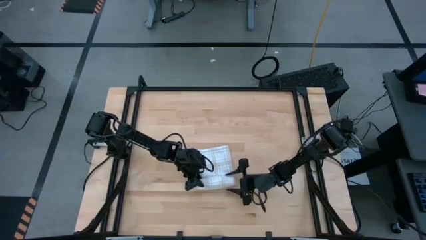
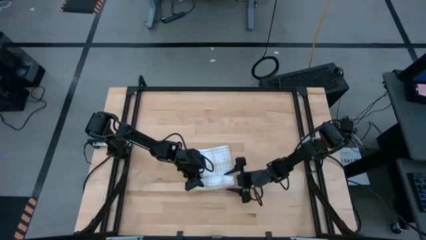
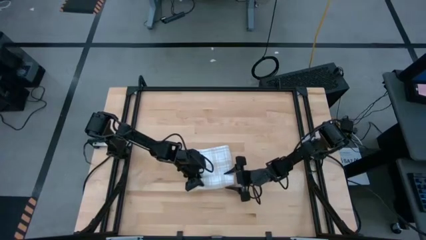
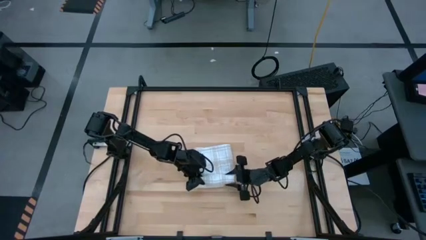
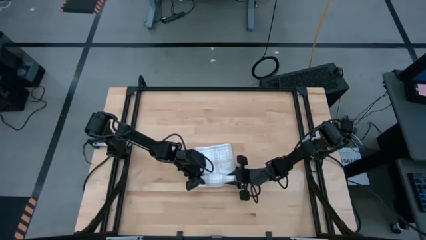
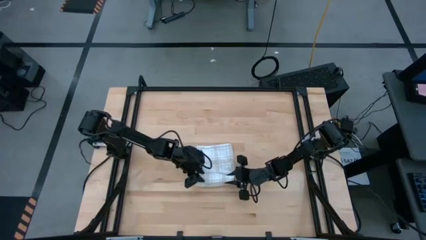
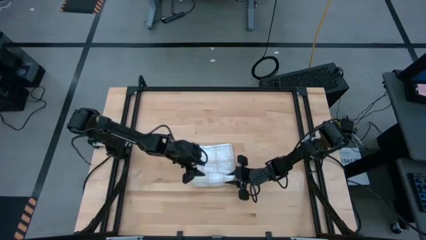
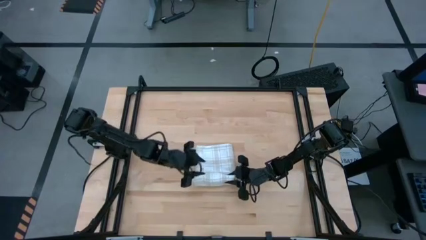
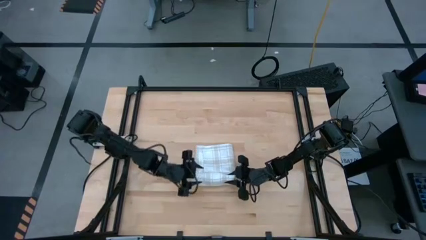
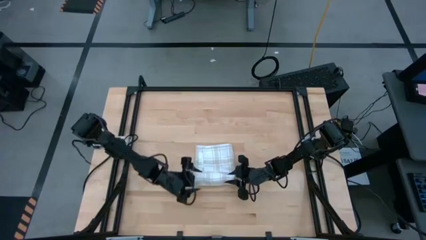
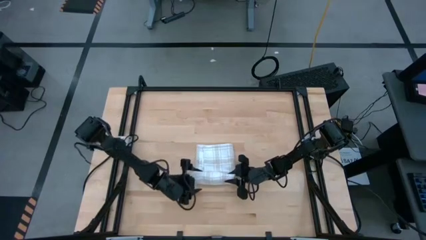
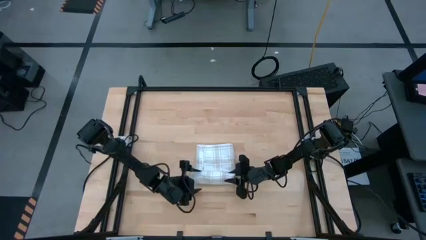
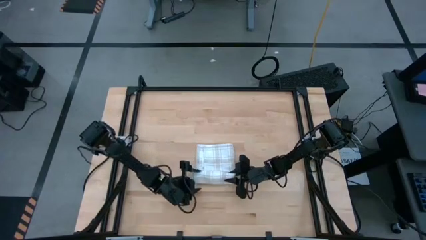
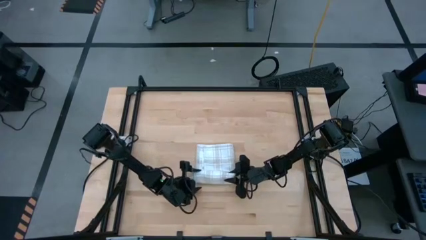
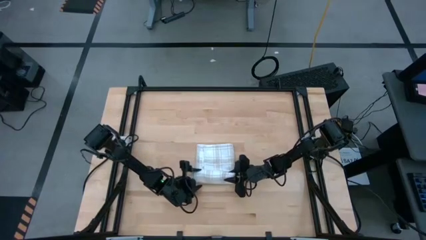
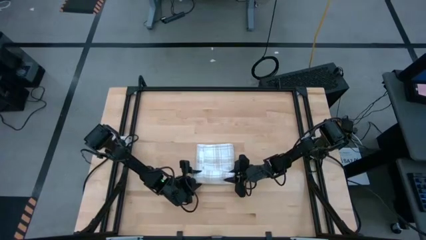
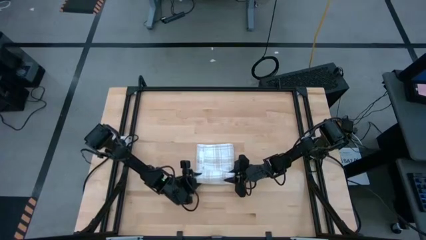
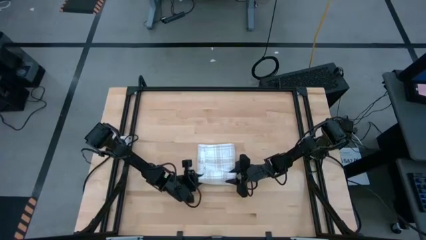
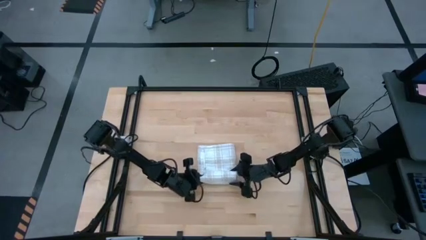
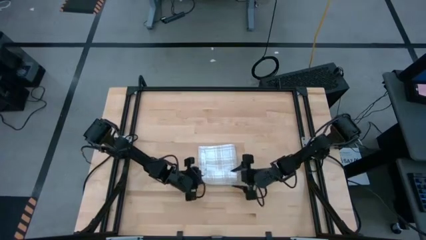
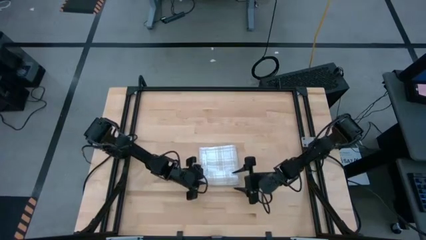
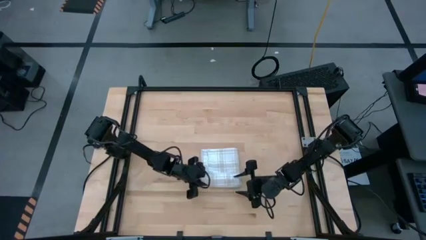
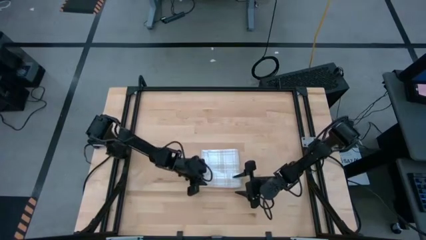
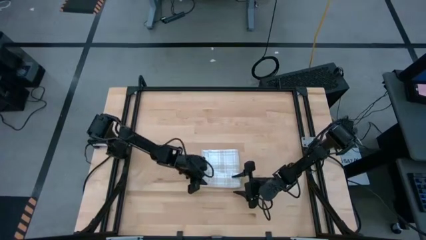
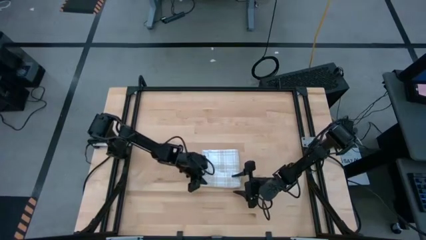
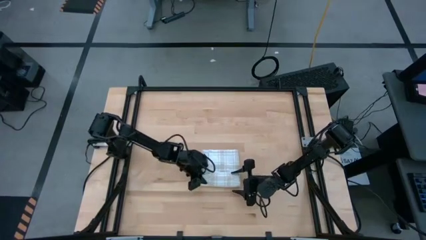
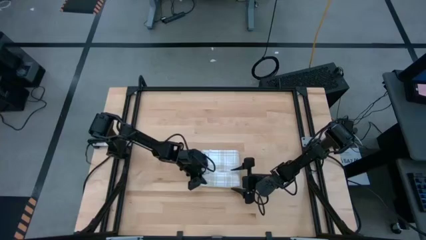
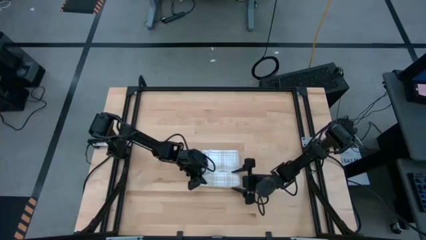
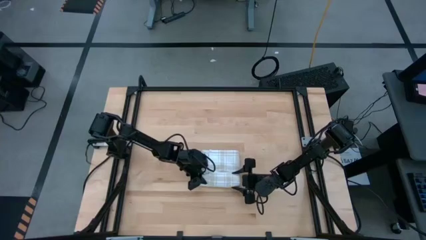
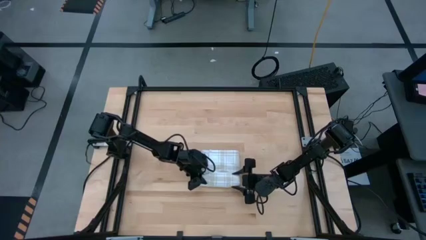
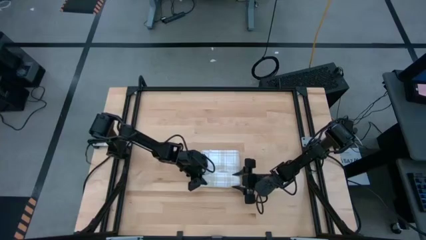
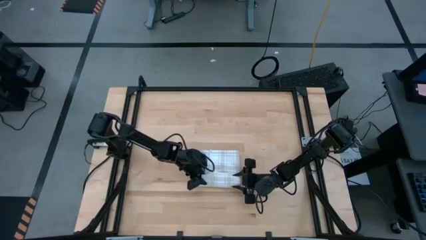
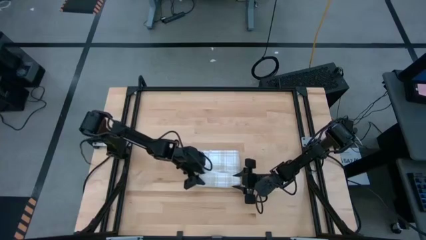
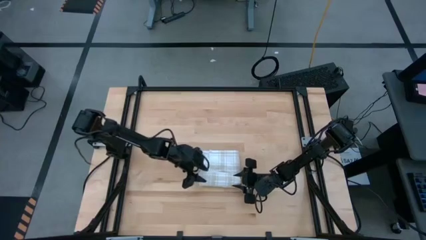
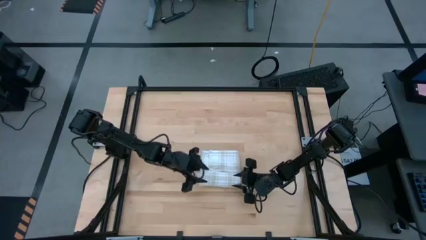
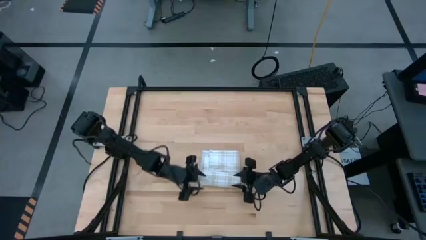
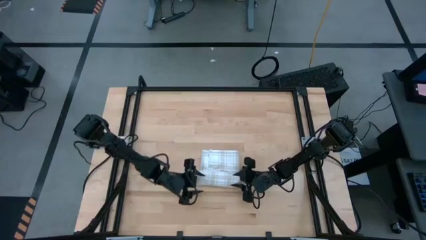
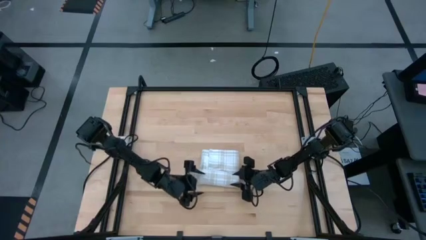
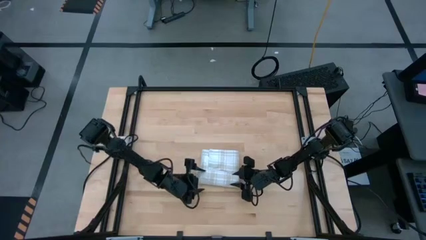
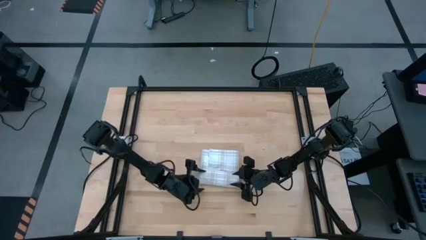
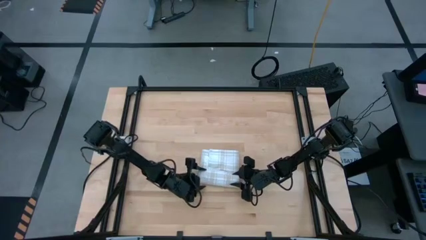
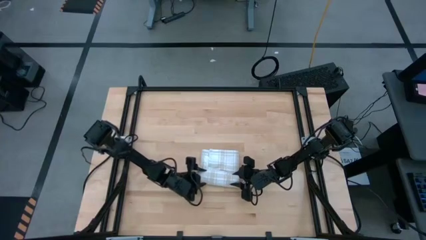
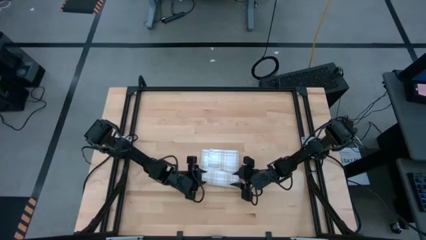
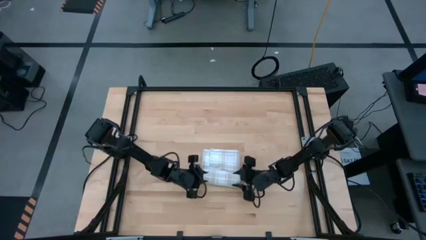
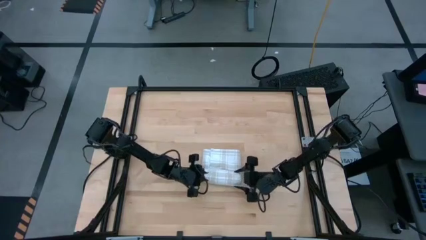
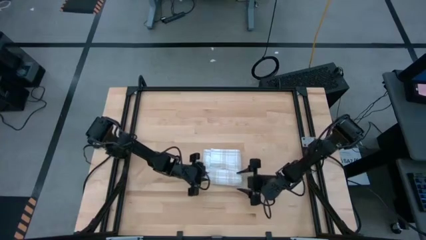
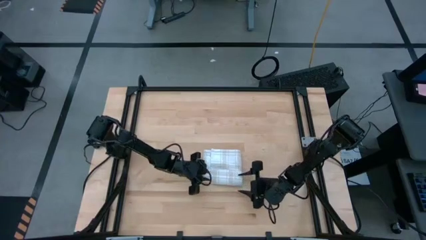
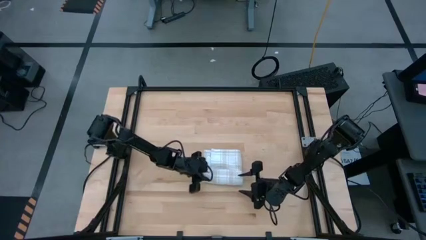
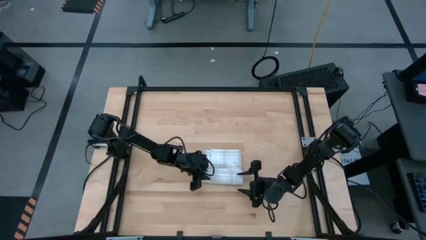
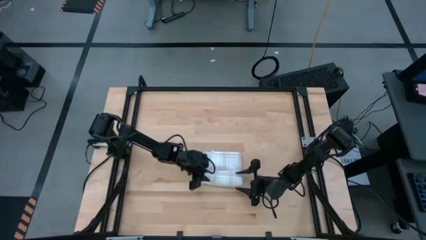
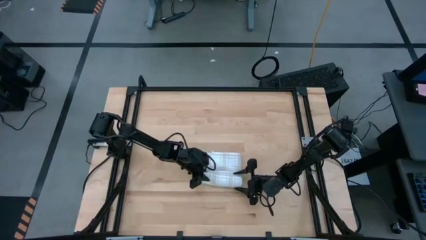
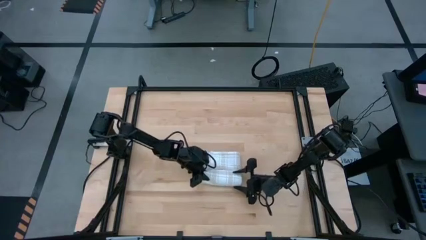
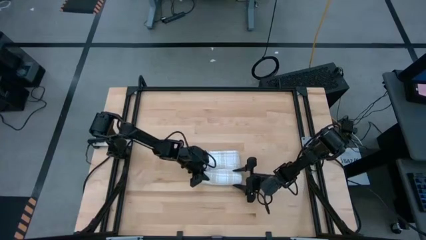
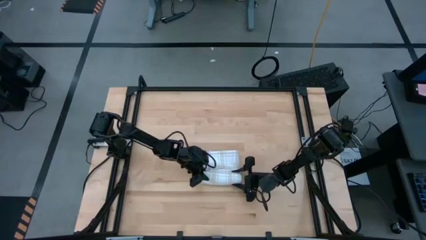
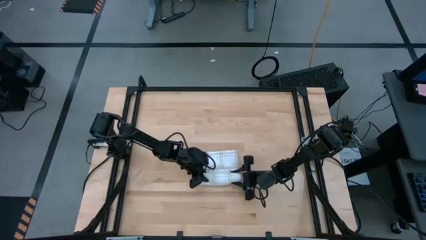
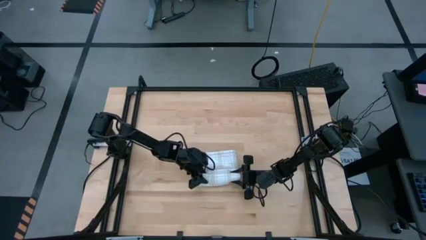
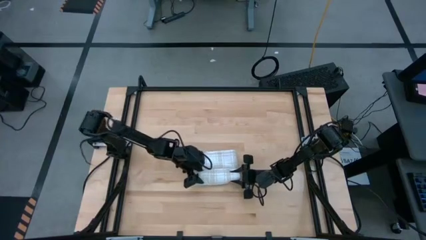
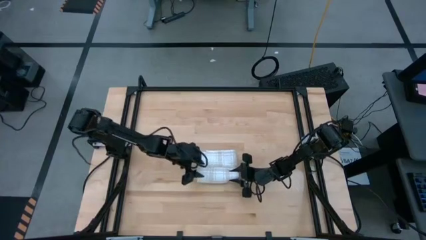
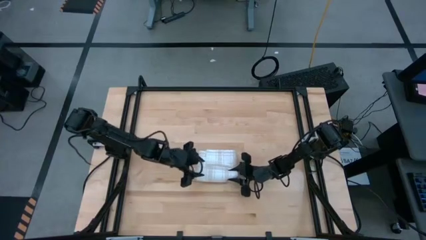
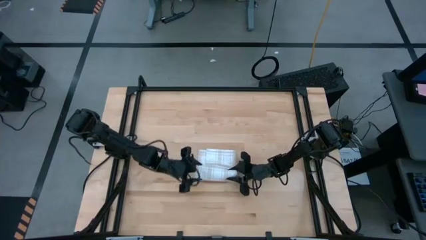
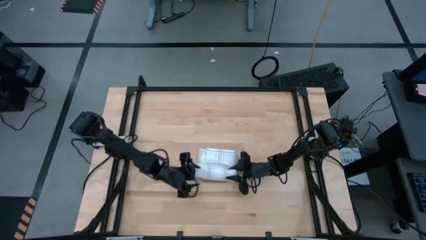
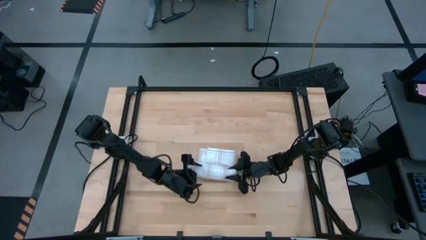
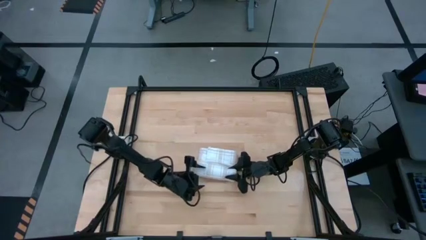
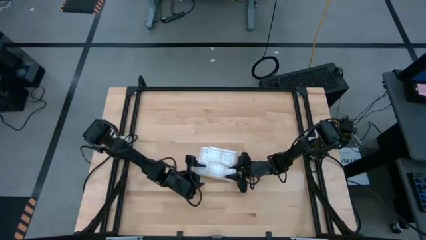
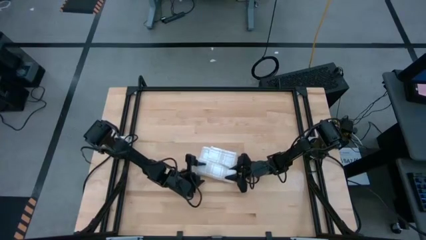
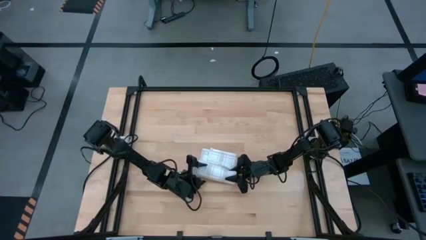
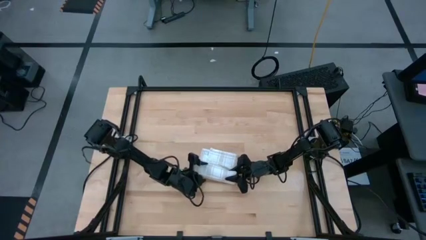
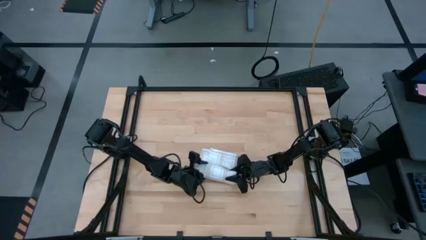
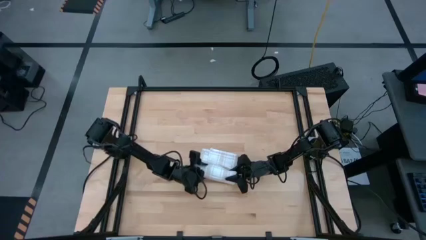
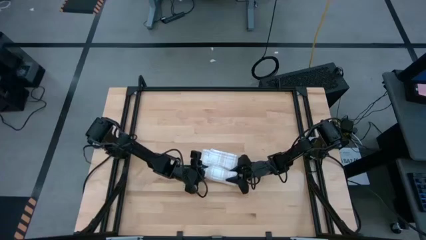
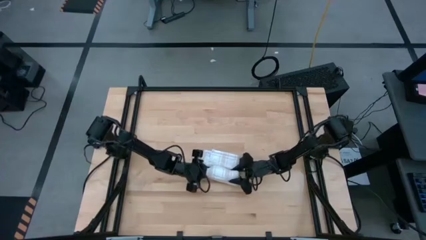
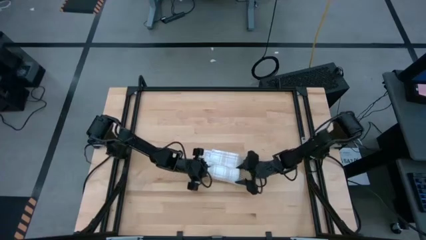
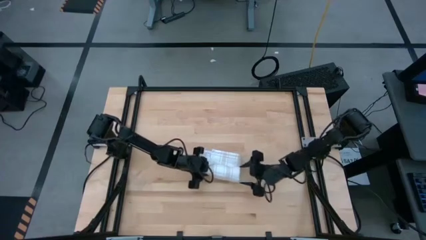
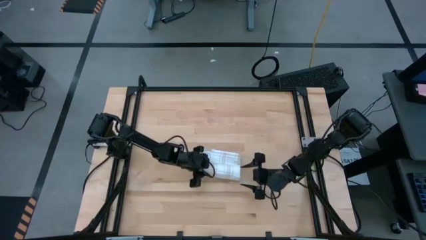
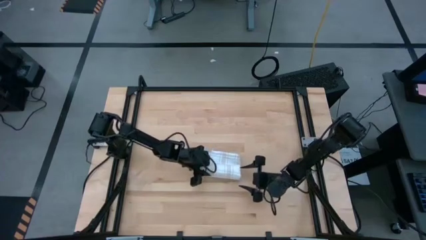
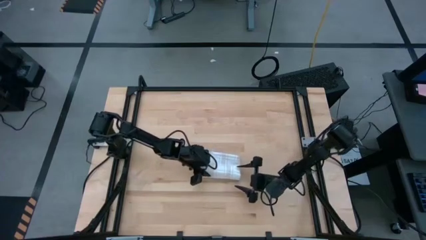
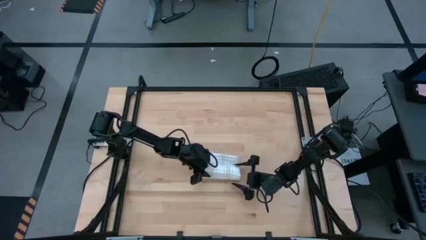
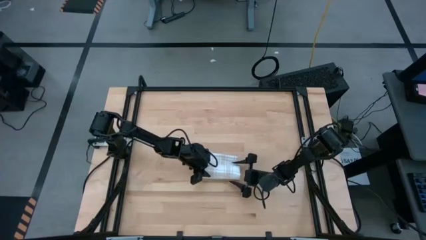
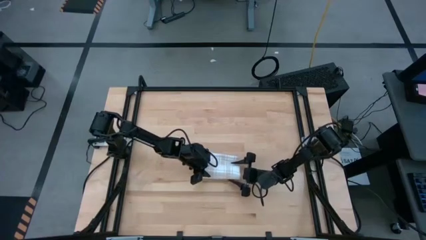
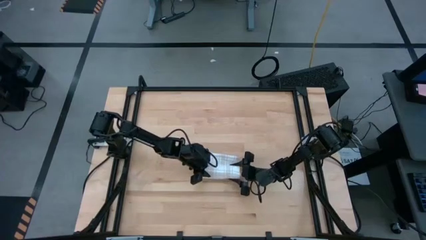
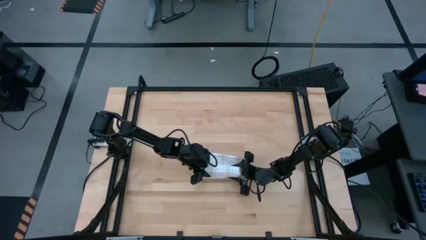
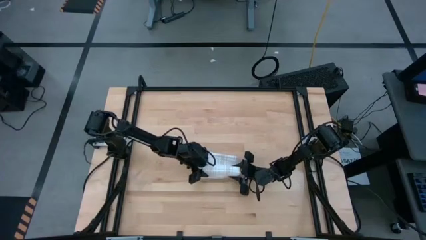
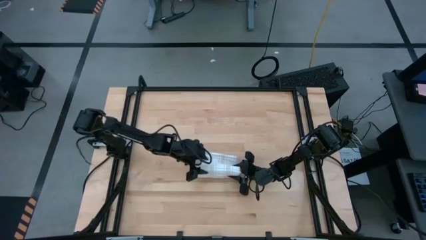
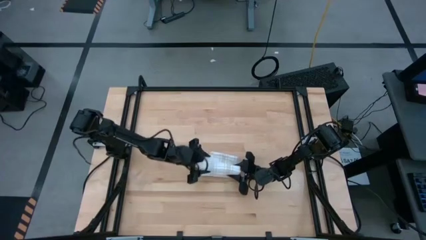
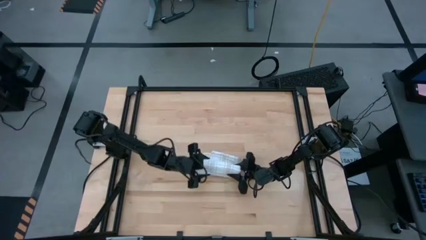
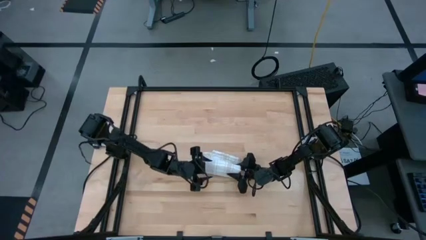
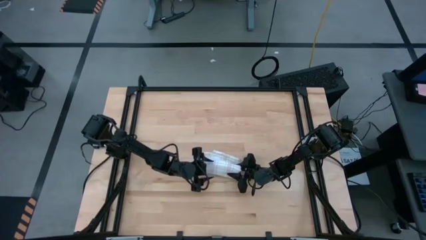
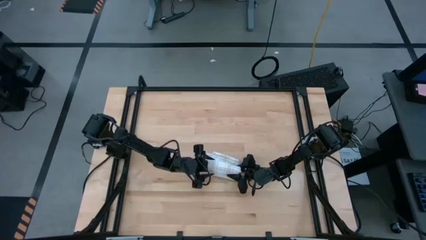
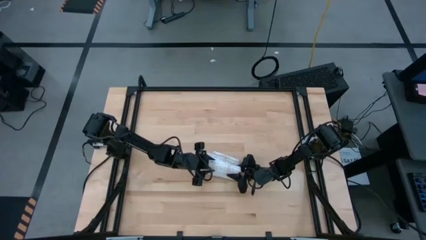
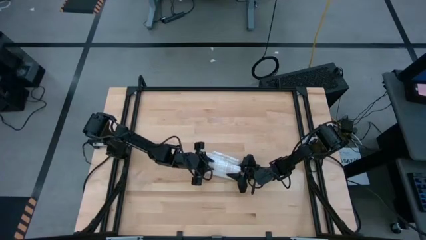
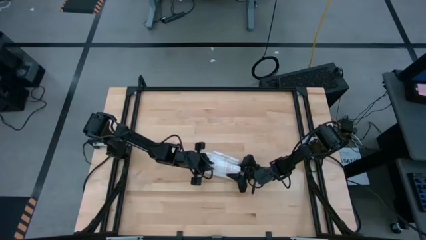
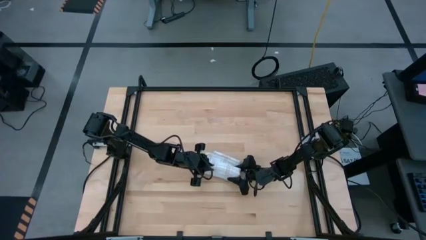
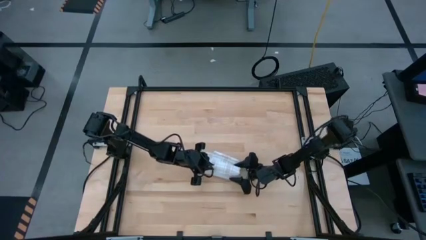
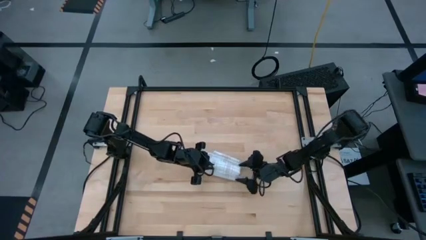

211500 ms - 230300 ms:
Task: Roll towel
Roll the white kitchen towel
